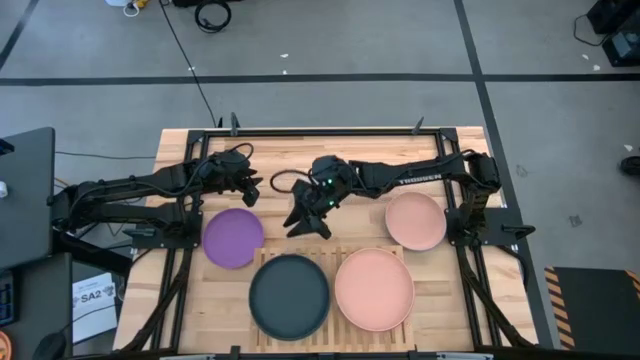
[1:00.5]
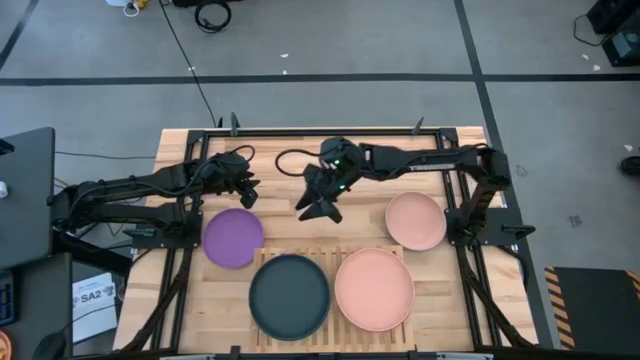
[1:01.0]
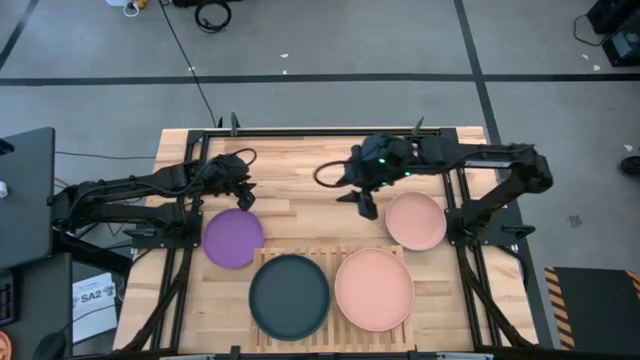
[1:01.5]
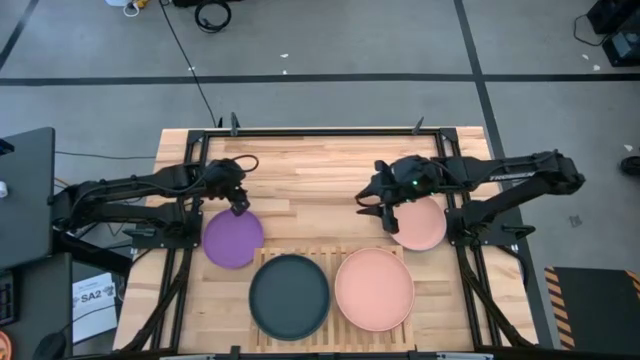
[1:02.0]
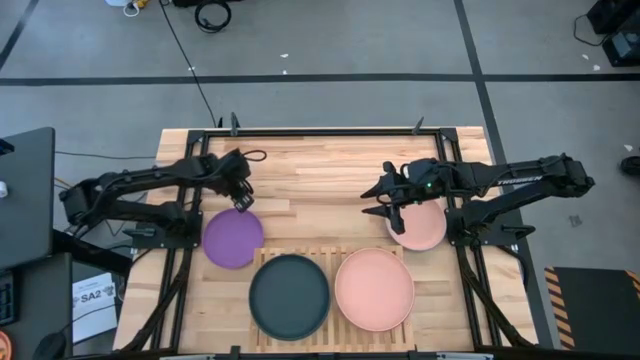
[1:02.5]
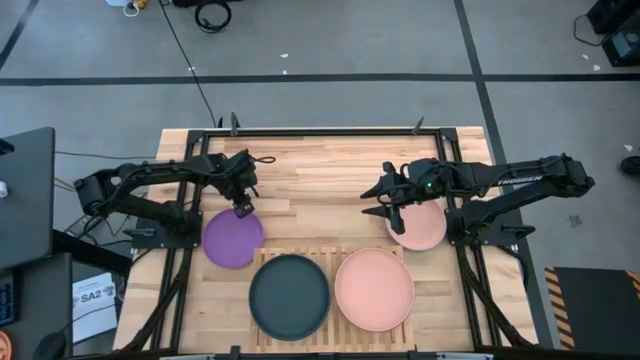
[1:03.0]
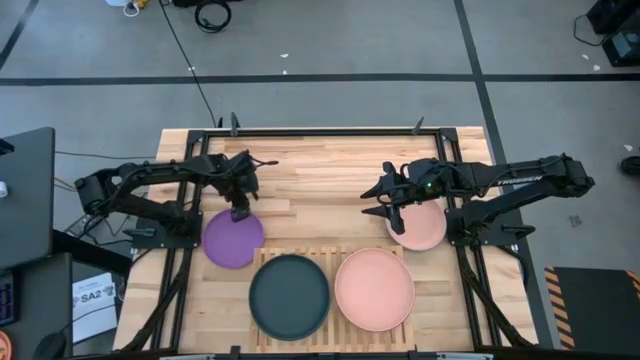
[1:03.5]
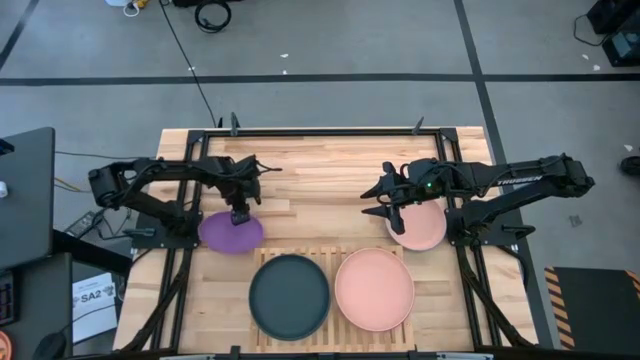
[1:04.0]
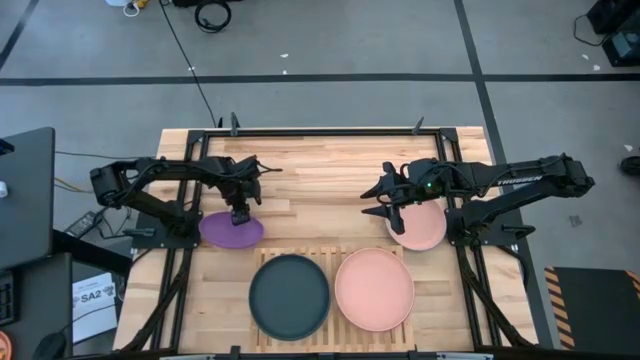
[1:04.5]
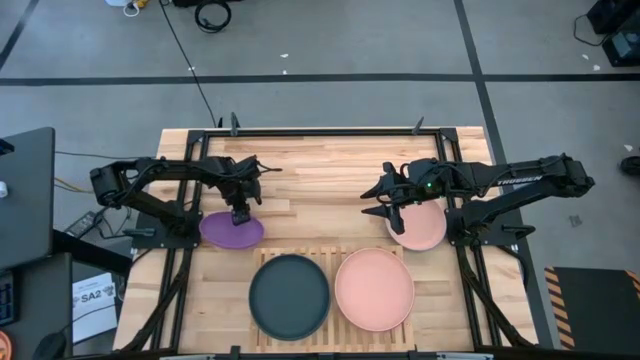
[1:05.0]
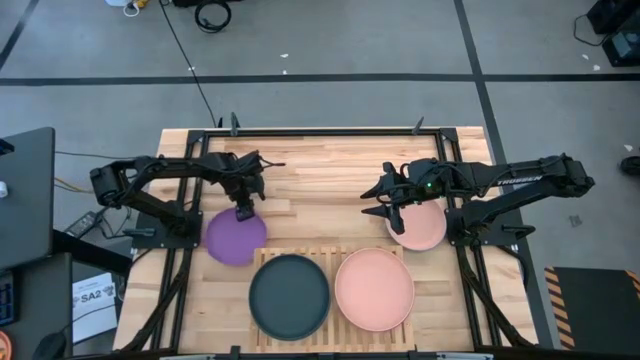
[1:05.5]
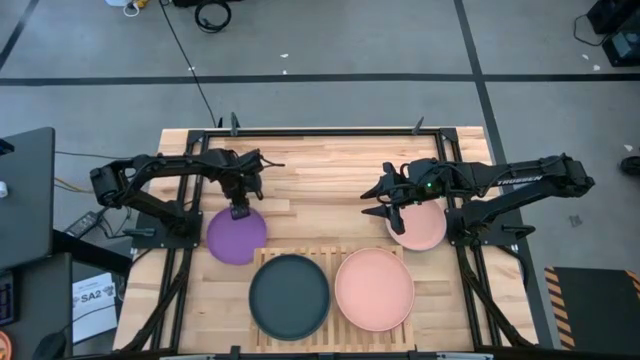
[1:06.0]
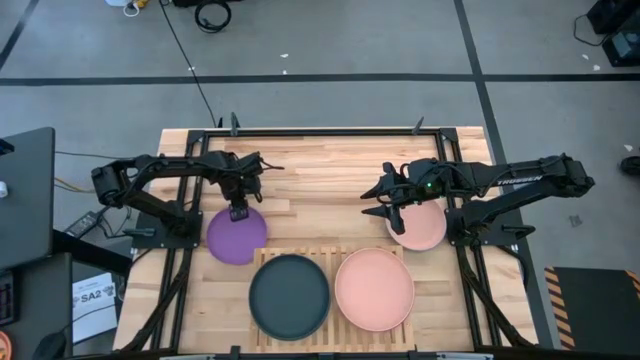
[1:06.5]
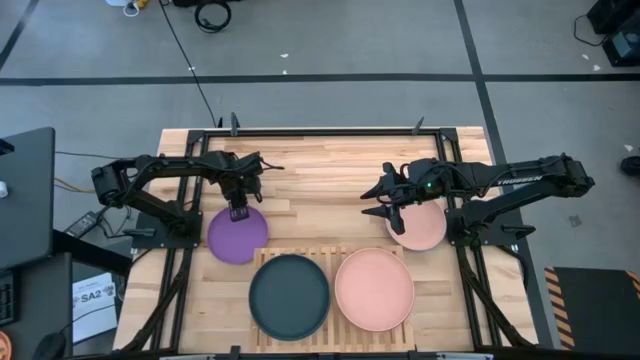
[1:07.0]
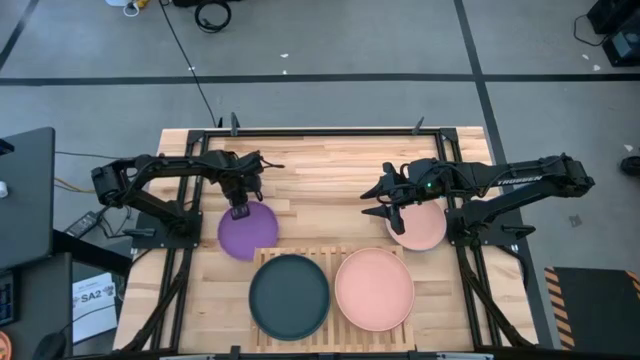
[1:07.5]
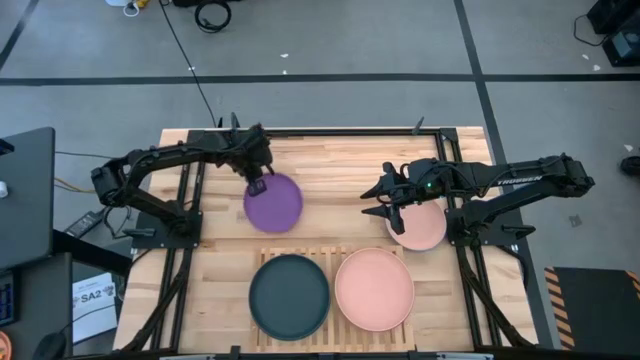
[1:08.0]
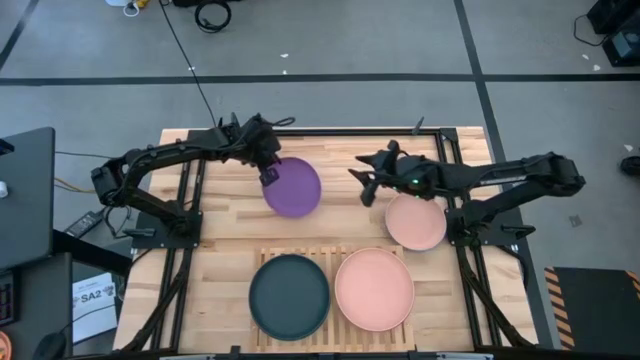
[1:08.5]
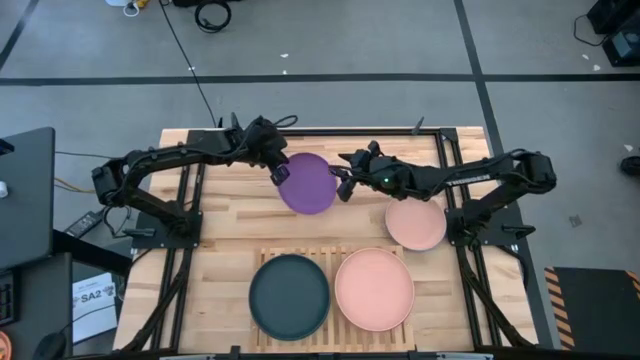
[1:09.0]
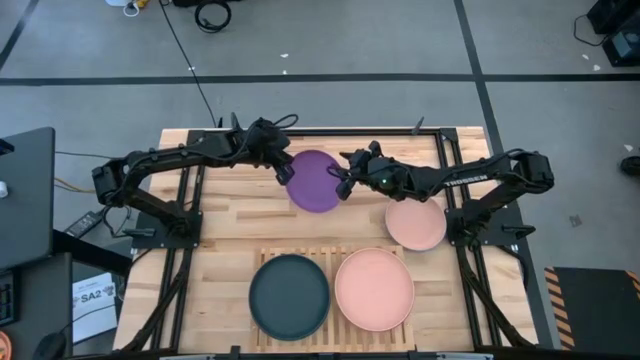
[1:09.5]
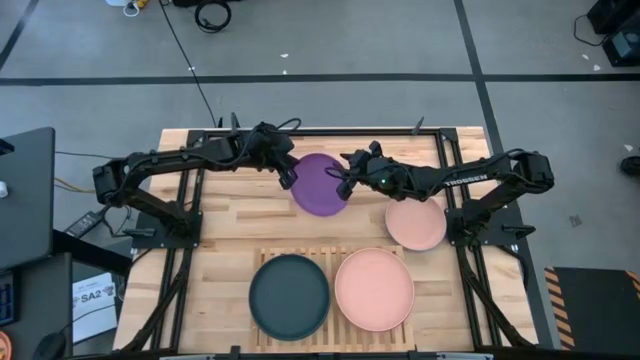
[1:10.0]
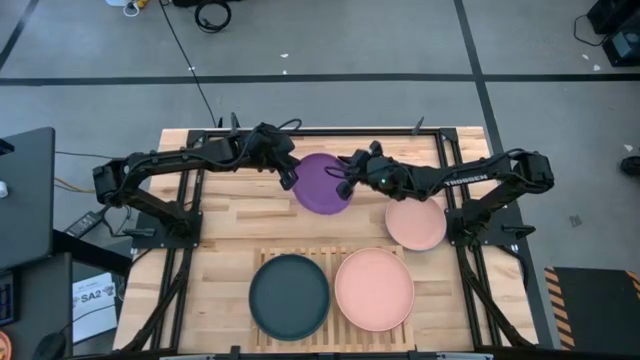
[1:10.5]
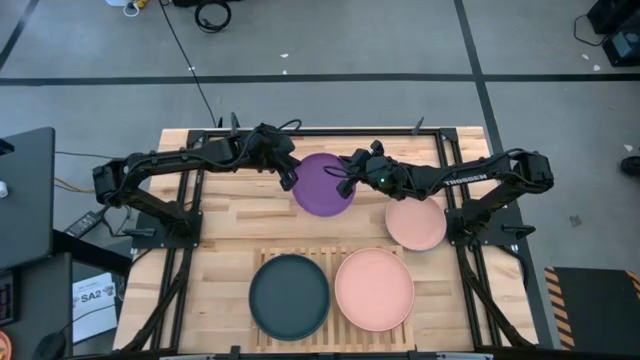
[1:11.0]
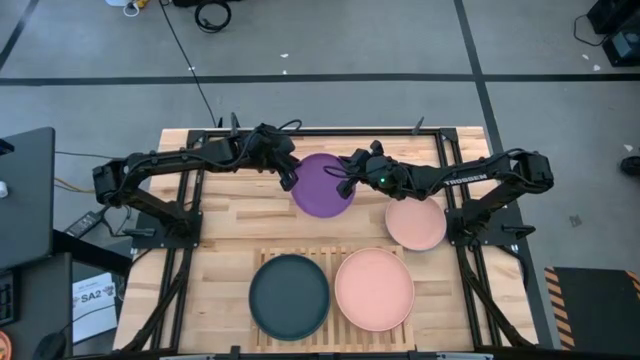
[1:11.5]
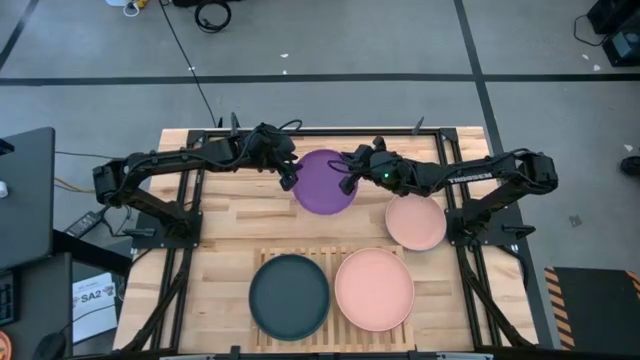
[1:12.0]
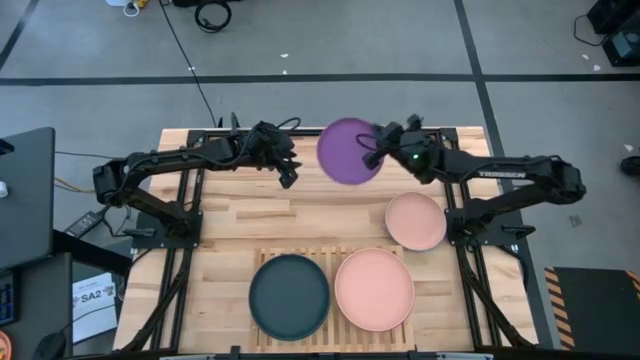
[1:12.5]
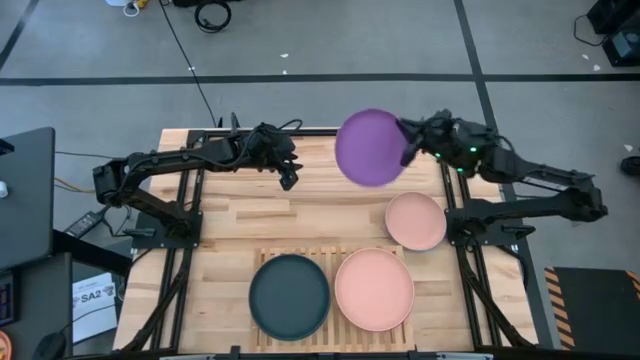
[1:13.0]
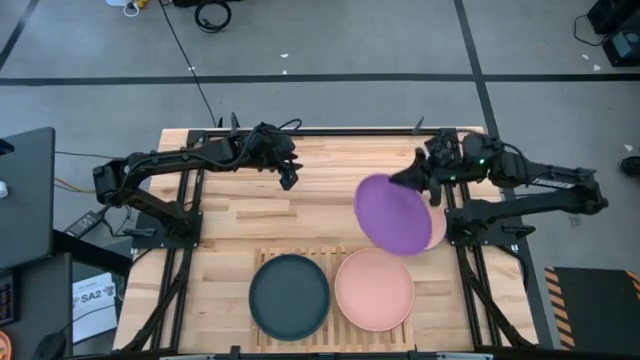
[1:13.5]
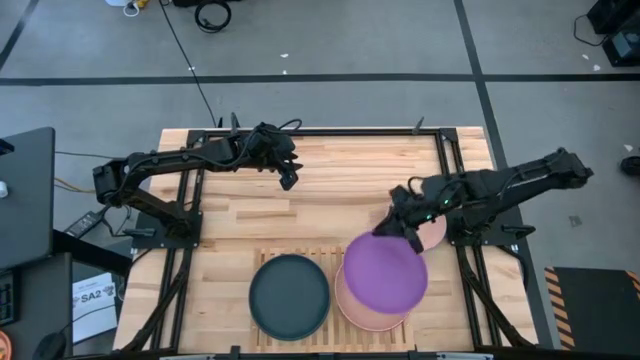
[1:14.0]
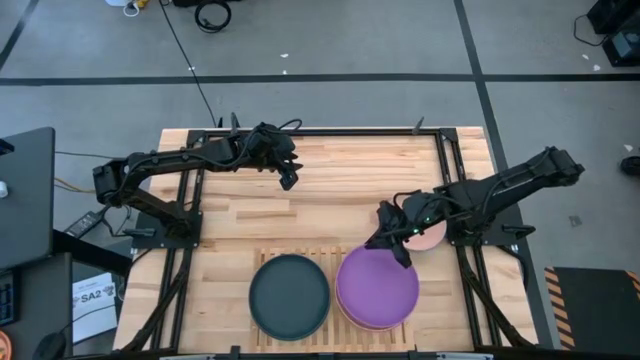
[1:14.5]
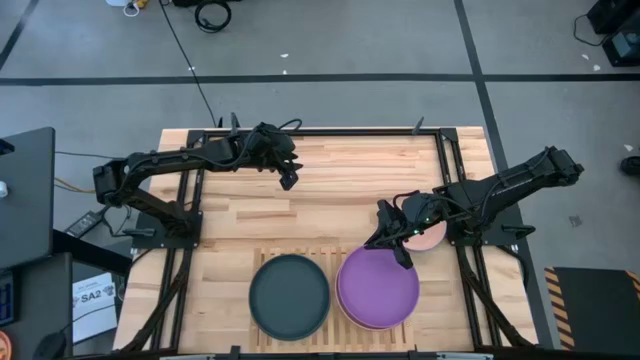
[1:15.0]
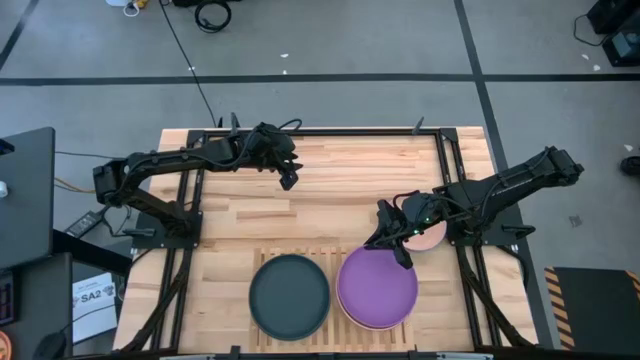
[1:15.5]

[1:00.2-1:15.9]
Task: Place and stack plates onto a shelf
Stack the violet plate on top of the light orange plate on the shelf

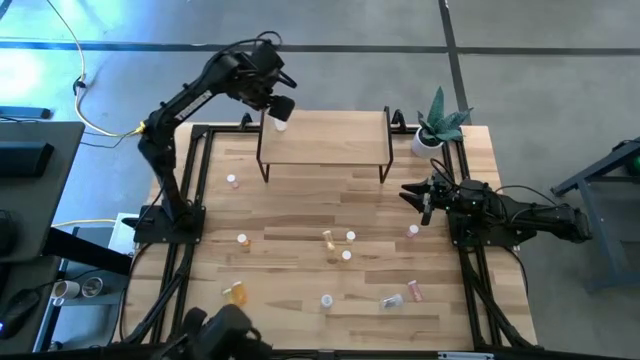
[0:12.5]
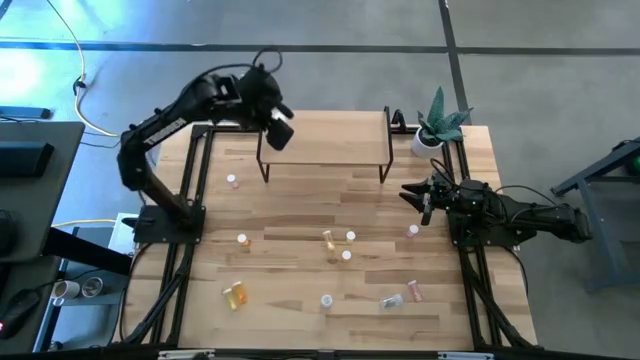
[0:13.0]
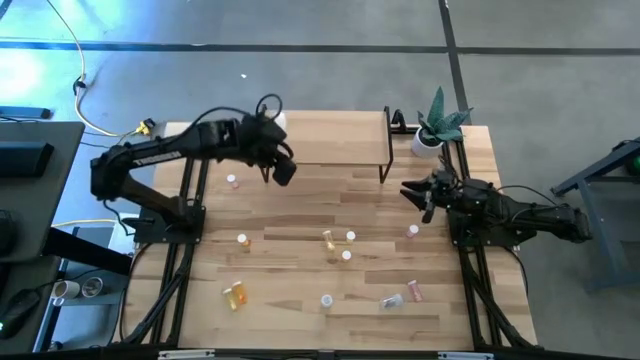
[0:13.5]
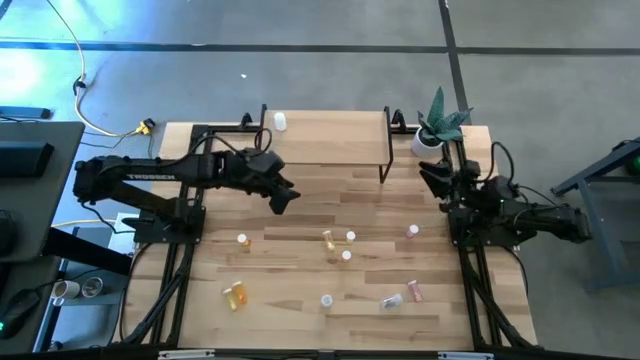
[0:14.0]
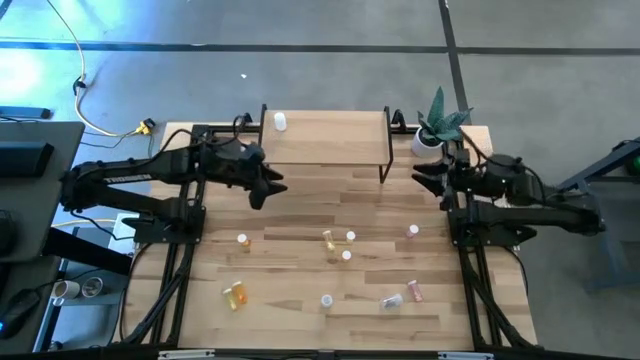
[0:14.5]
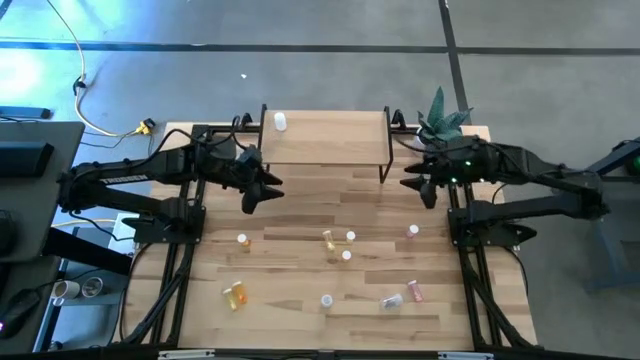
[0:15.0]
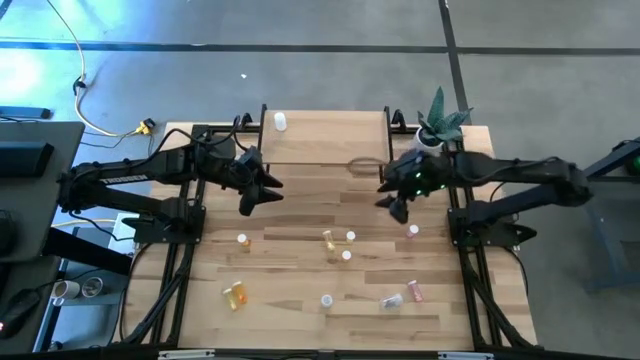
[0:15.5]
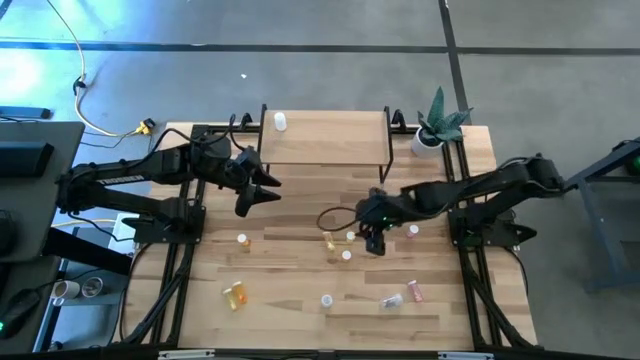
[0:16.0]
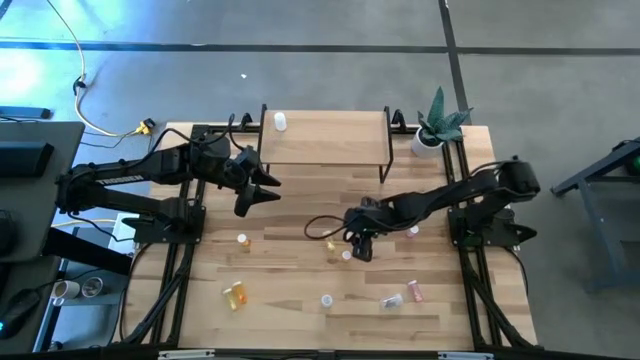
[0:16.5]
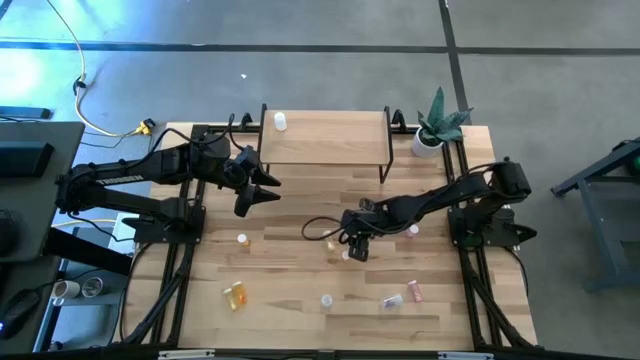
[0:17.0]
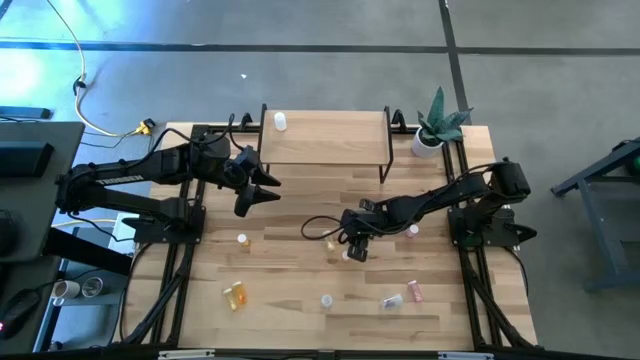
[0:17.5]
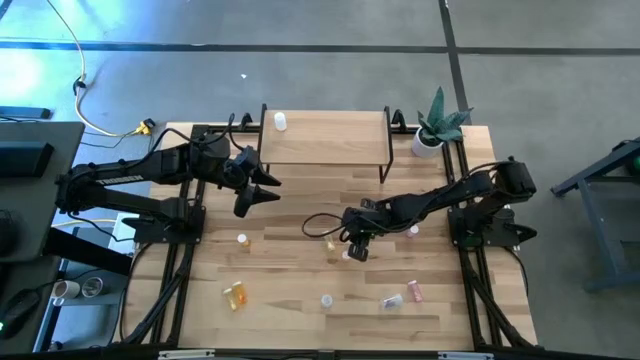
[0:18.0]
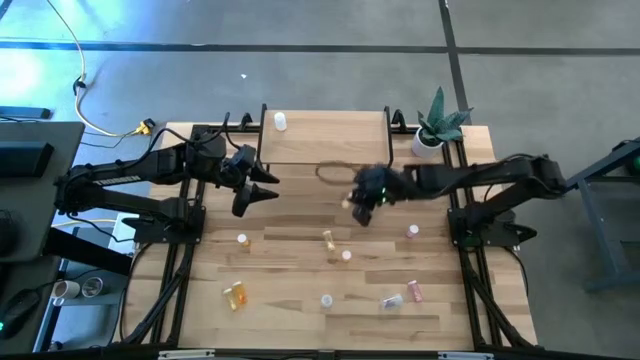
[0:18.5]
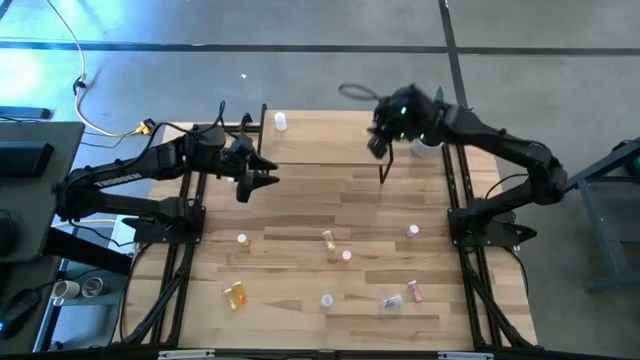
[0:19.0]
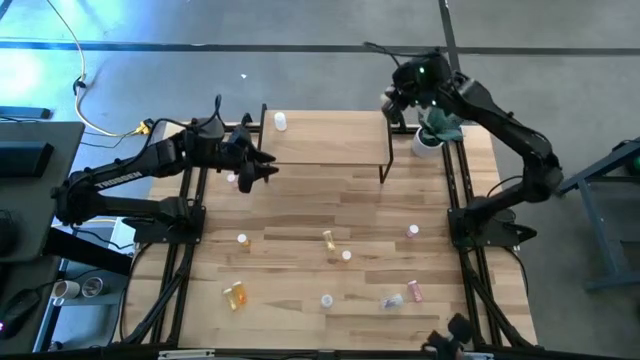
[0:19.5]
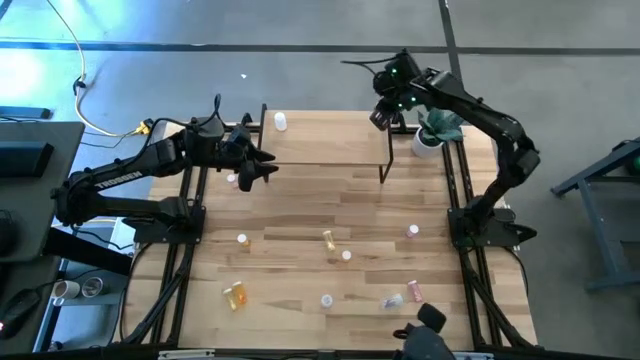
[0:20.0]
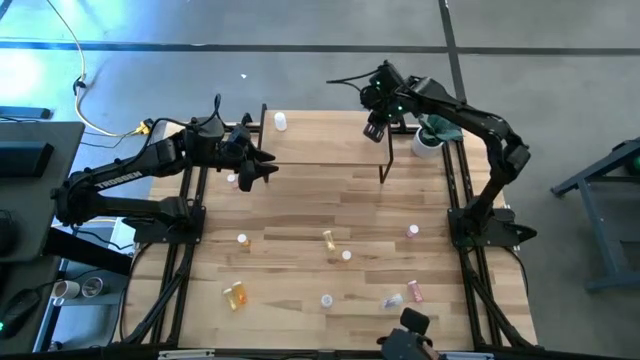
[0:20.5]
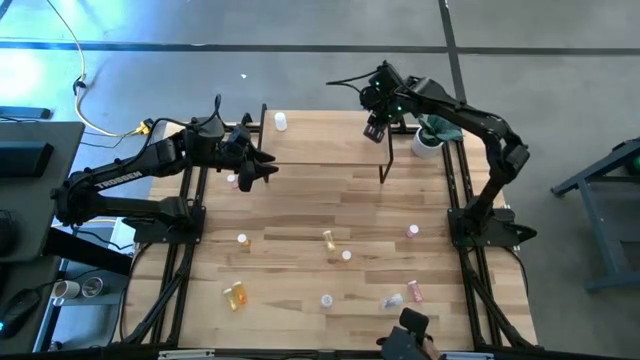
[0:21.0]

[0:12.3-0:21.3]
Task: Pick and place medicine bottles onto shelf by color
Put the top right yellow pill bottle on the shelf
